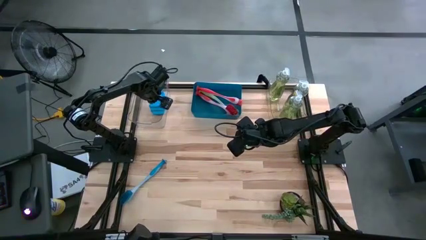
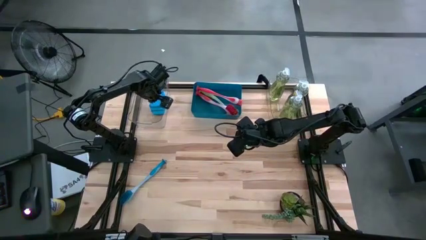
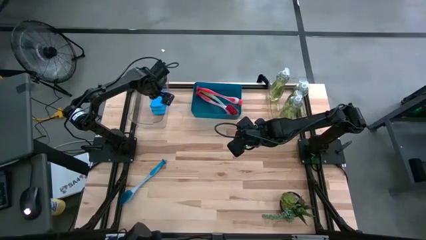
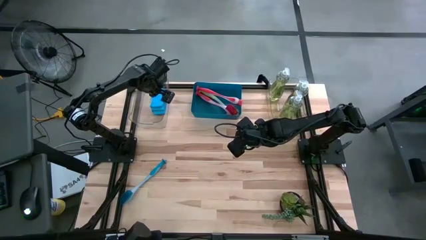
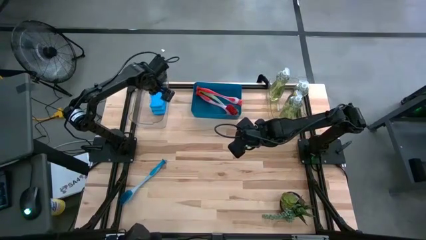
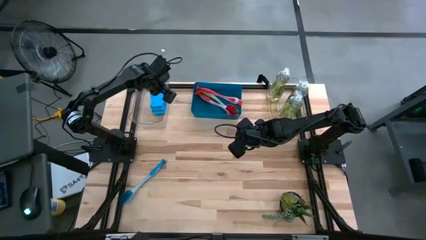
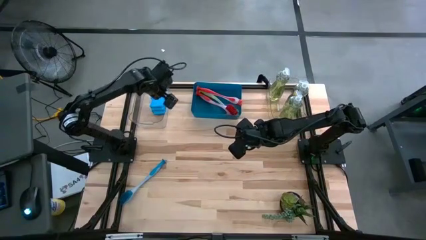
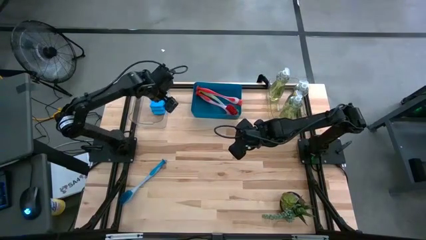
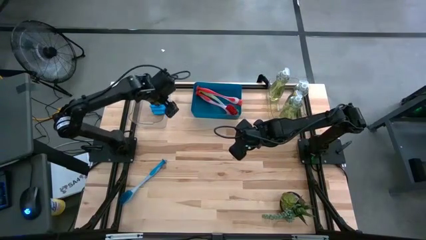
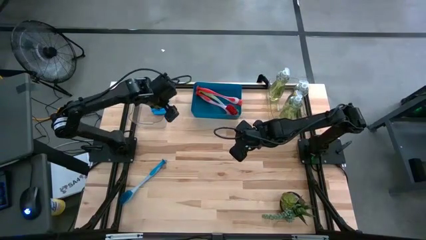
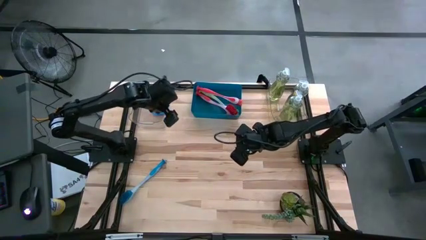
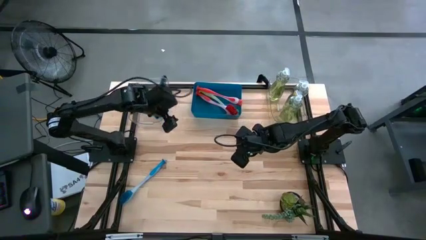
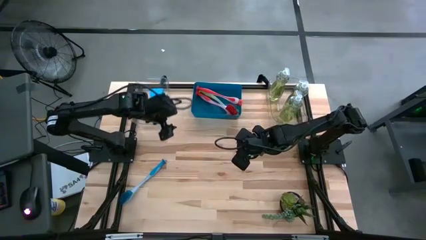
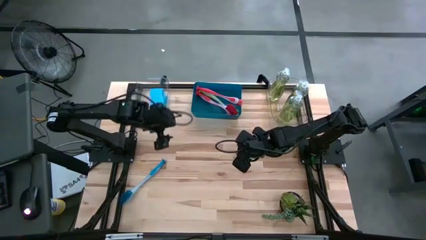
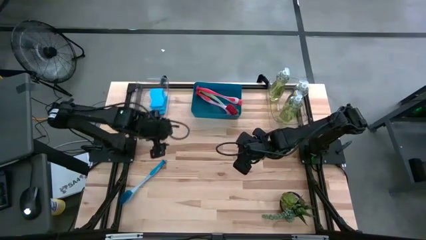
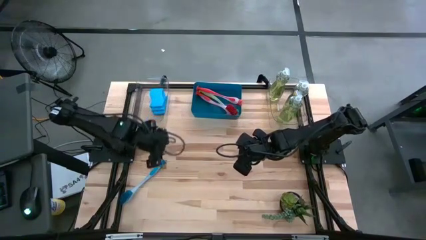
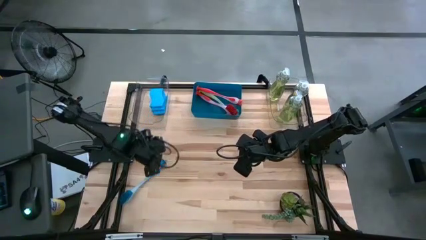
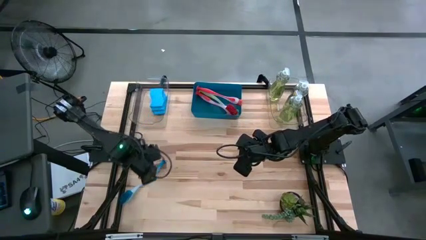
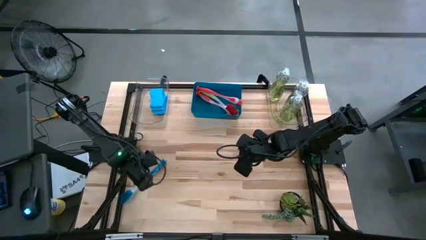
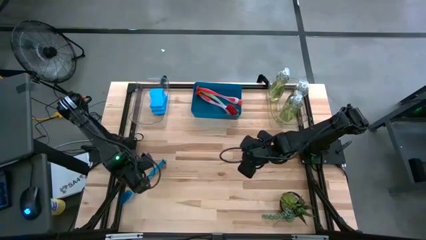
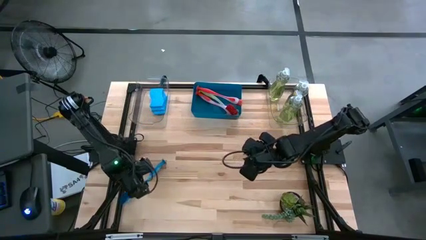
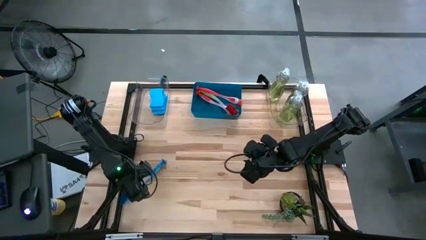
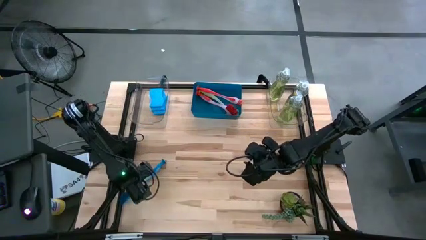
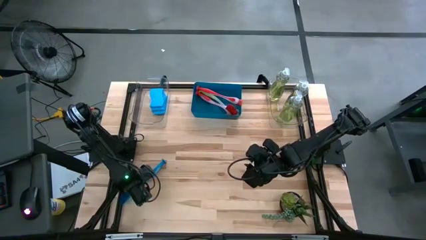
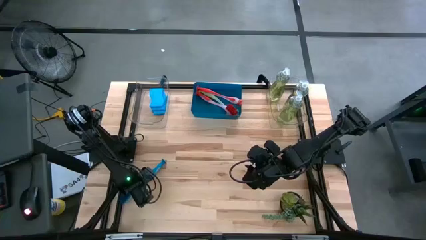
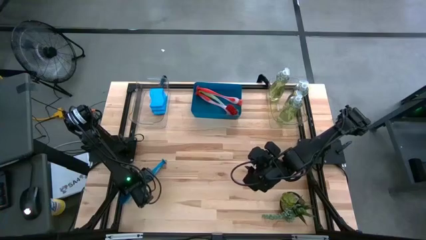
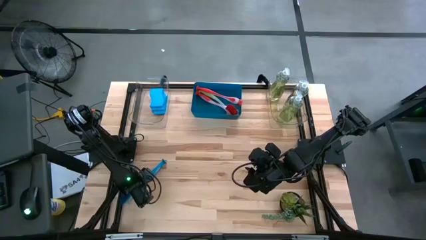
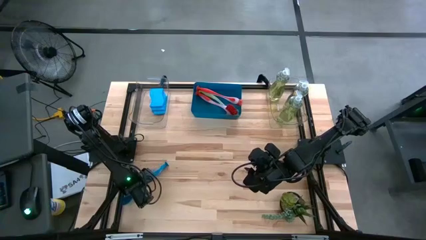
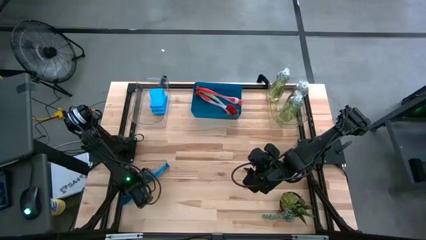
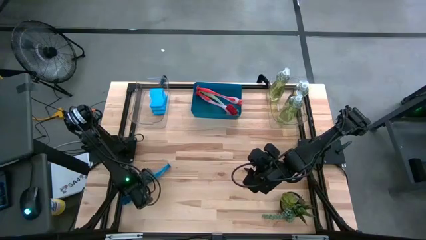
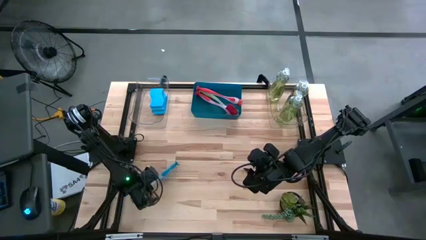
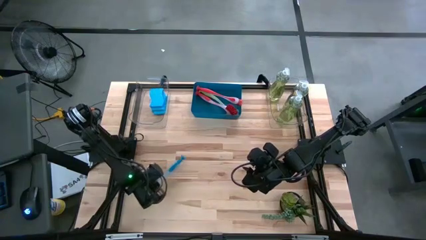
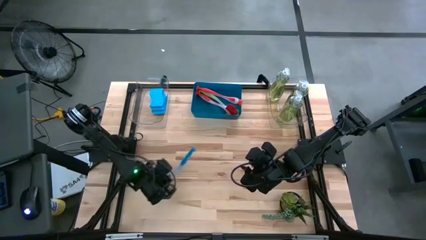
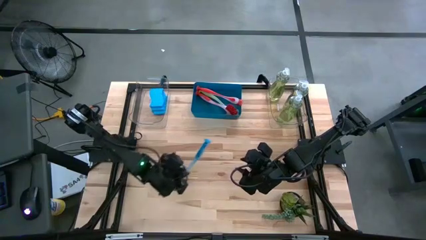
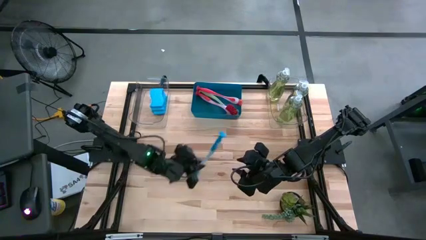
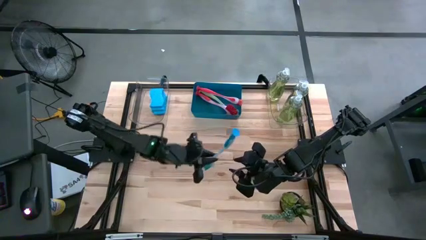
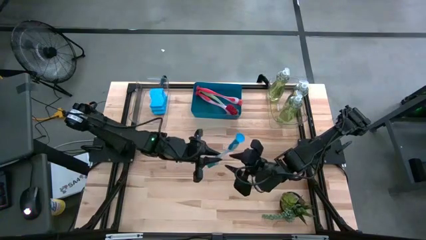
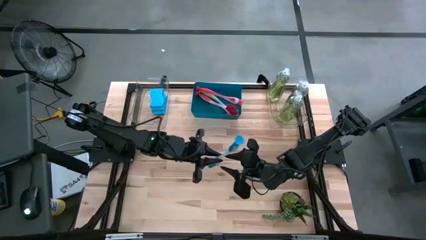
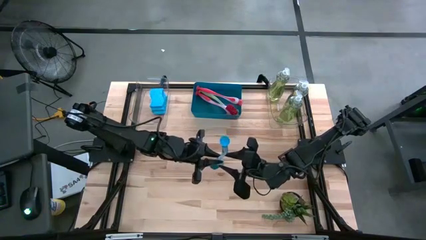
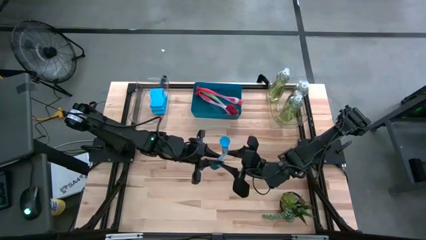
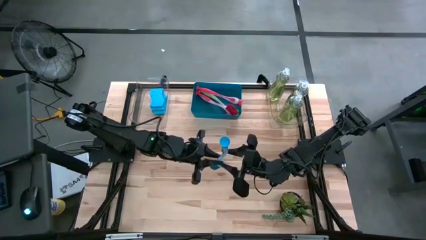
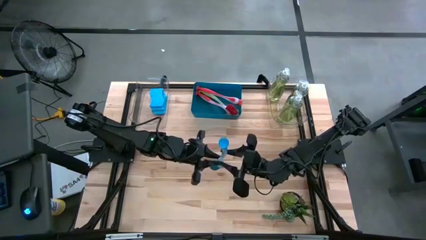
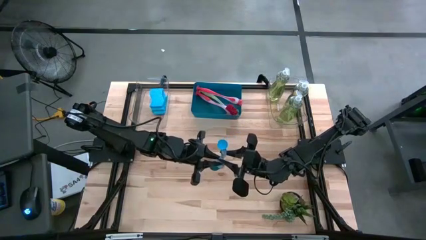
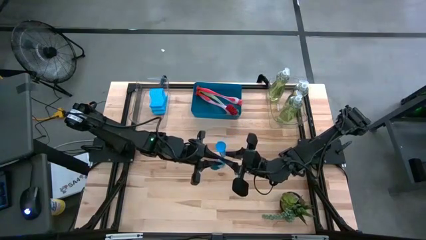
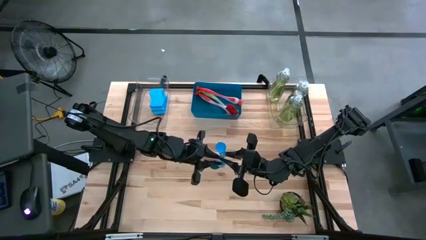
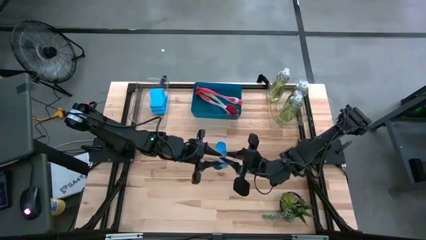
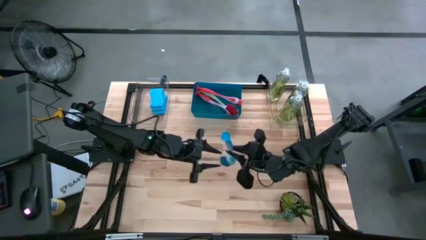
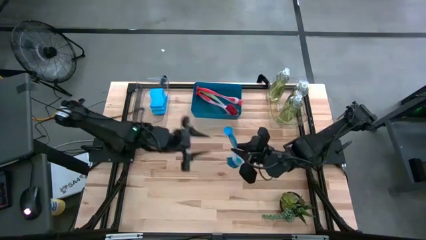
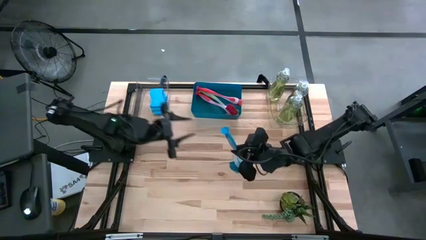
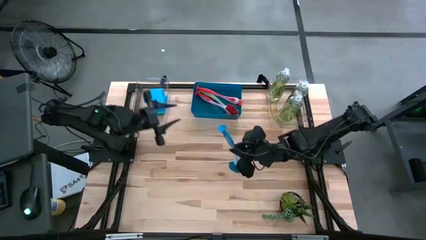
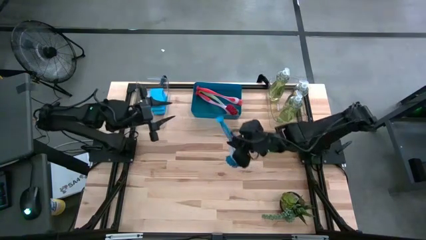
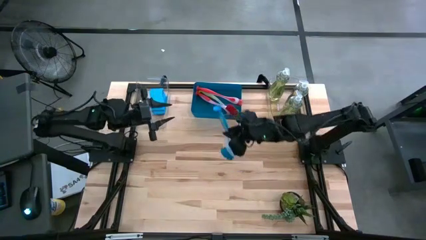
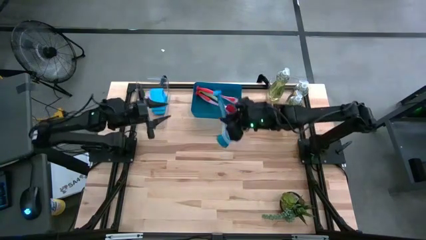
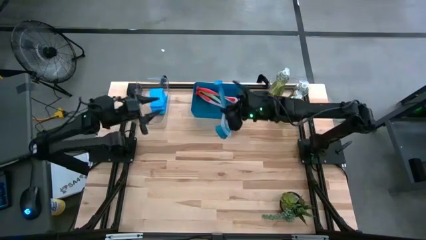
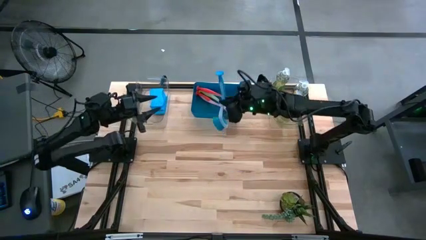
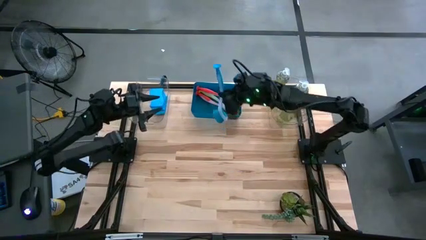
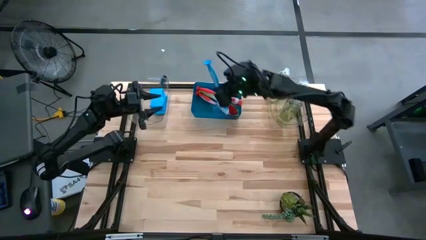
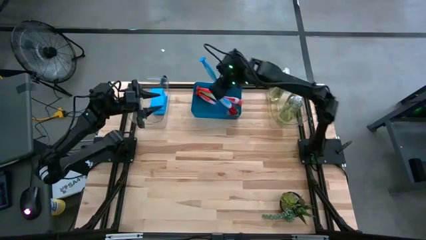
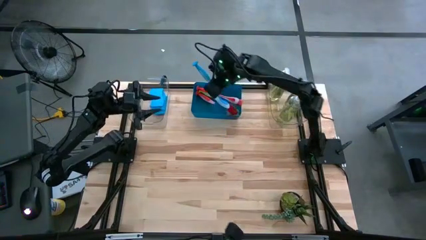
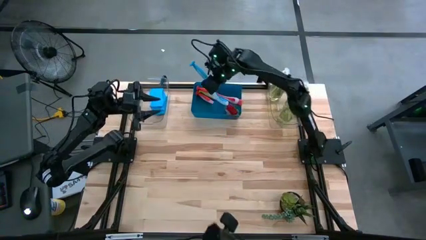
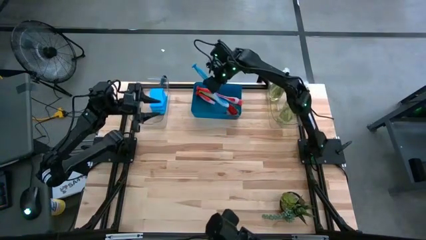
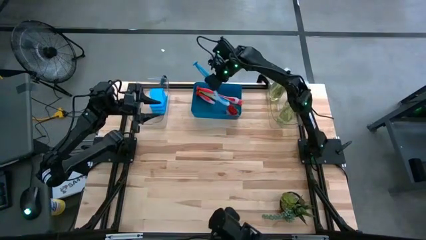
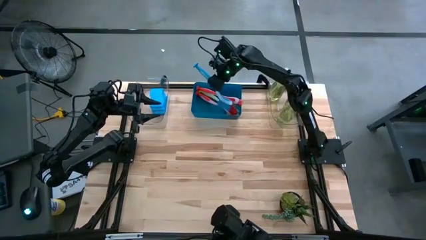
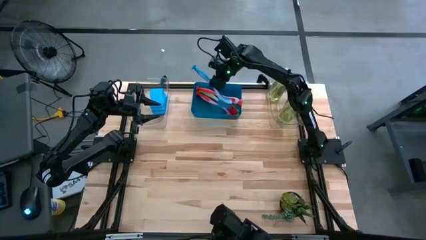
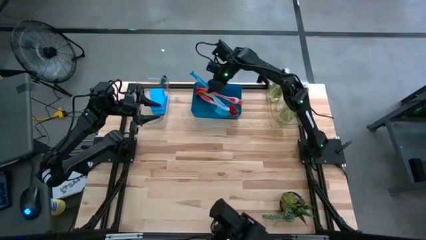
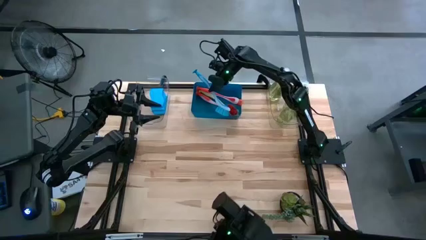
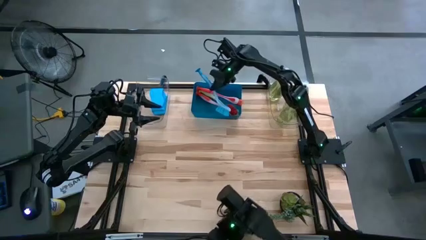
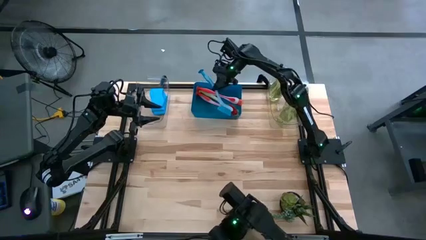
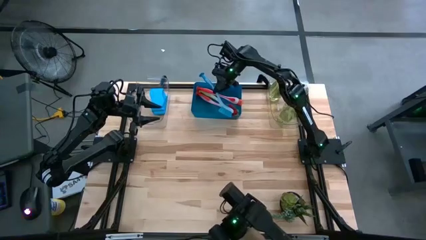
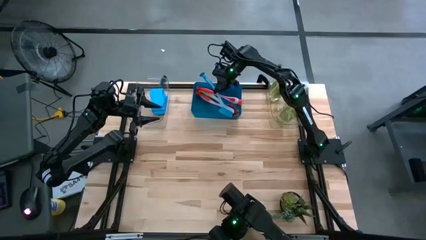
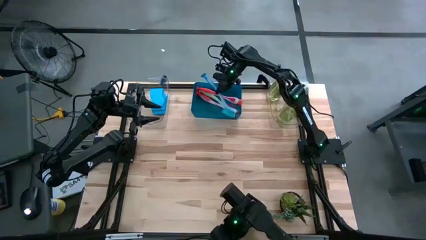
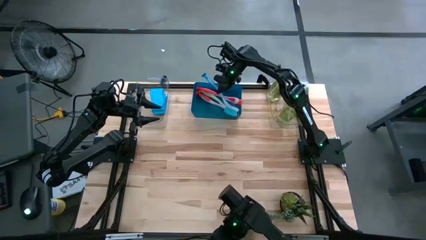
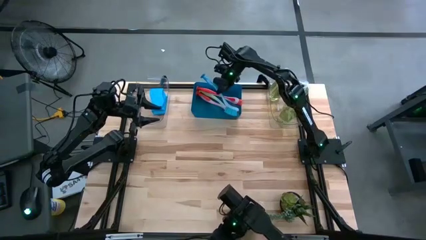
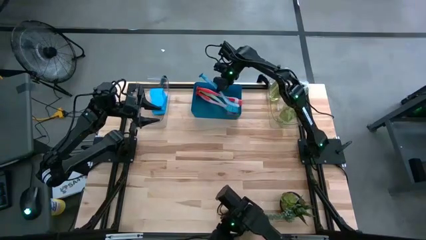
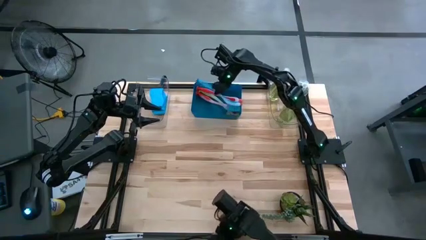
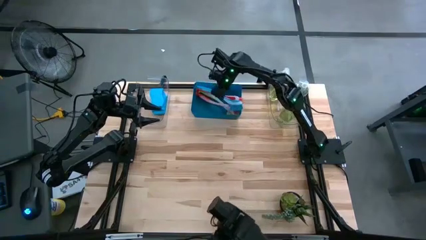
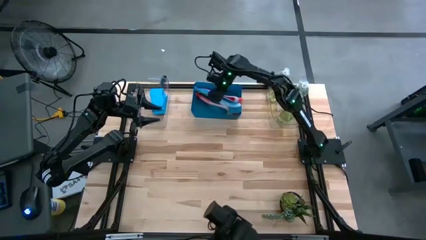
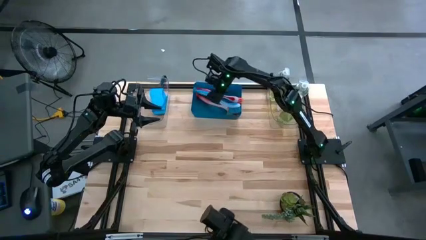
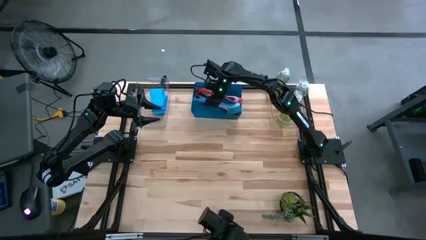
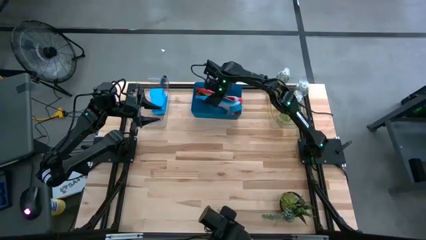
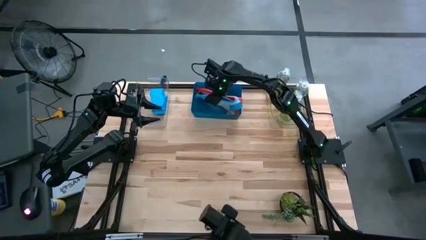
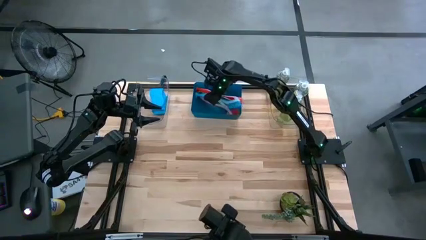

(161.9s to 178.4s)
Task: Pick & Place Kitchen Sink Supplies
Put the blue dish brush into the blue bin
